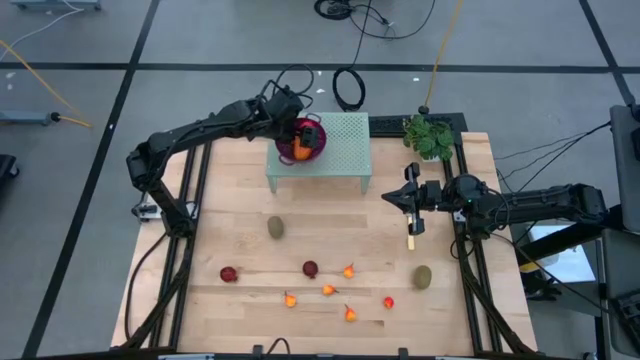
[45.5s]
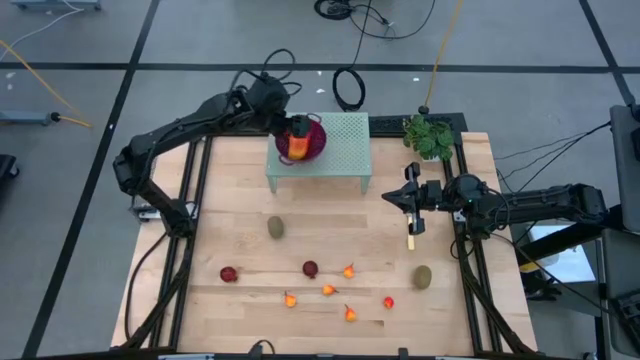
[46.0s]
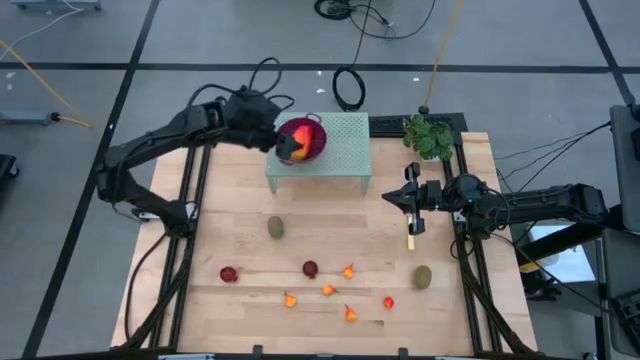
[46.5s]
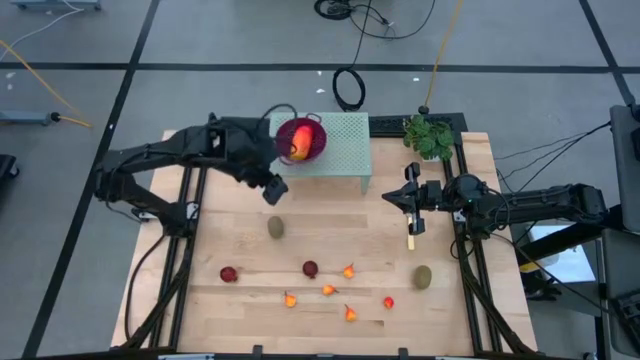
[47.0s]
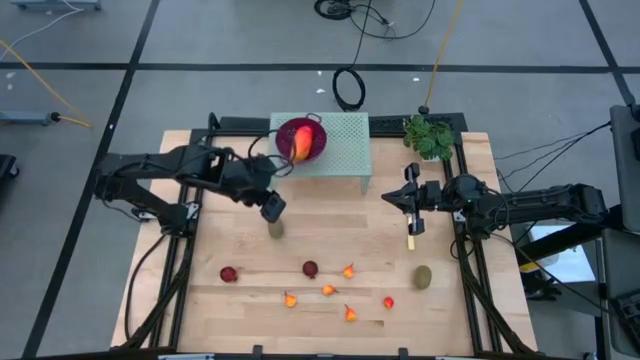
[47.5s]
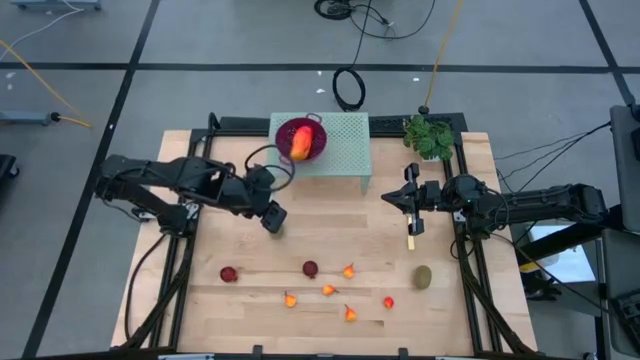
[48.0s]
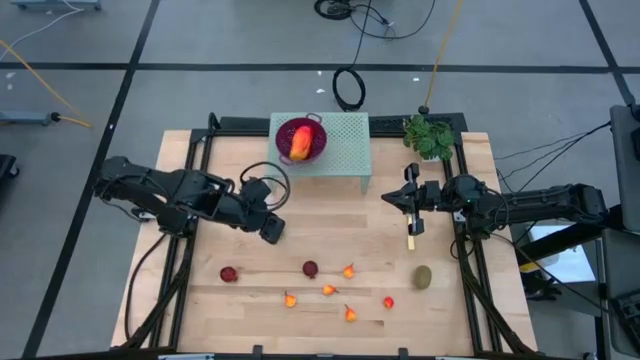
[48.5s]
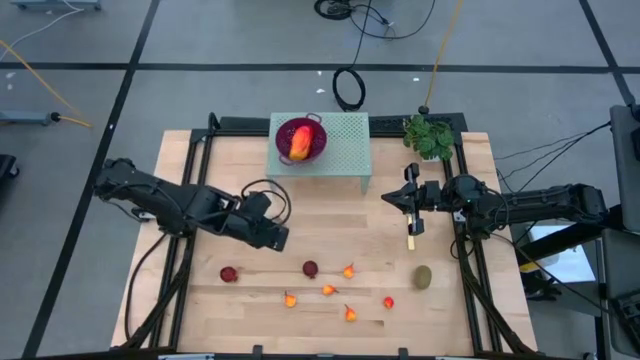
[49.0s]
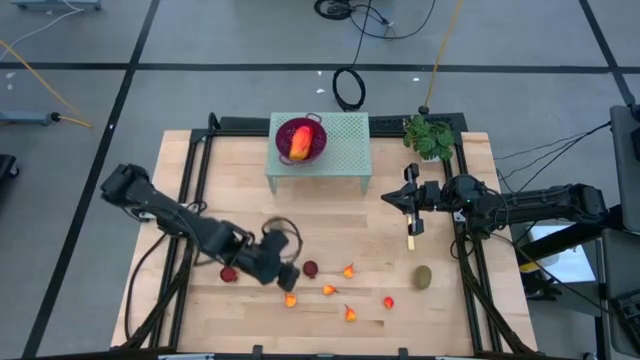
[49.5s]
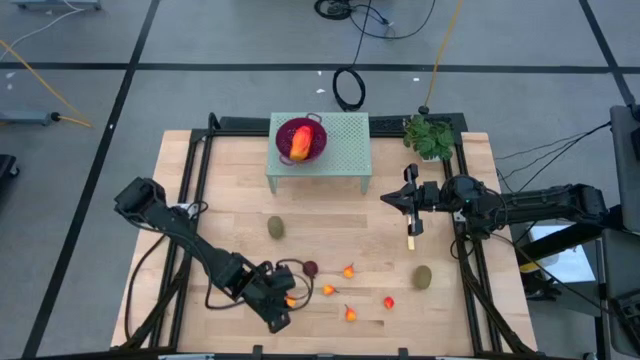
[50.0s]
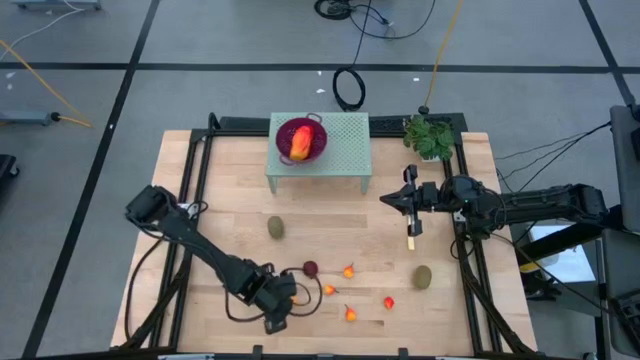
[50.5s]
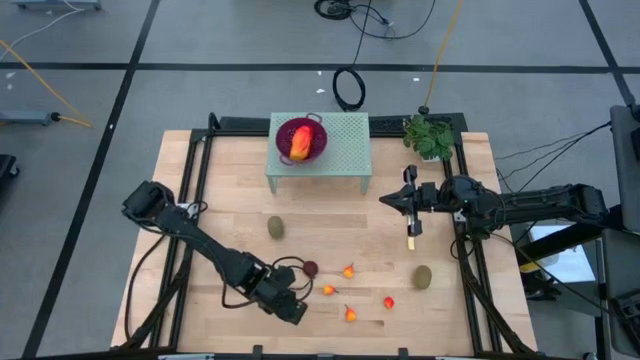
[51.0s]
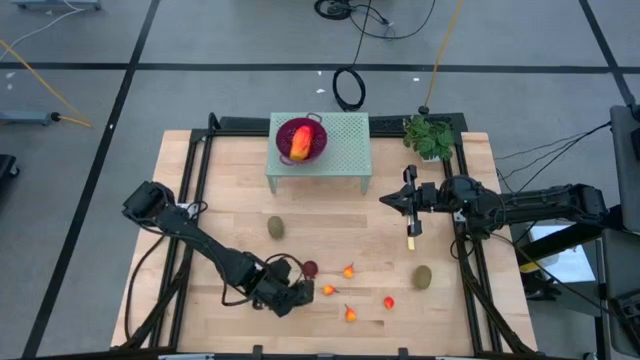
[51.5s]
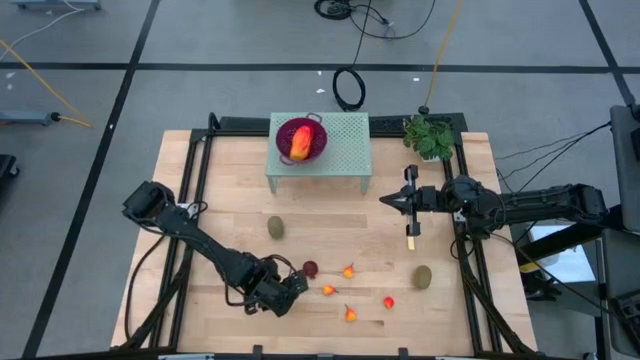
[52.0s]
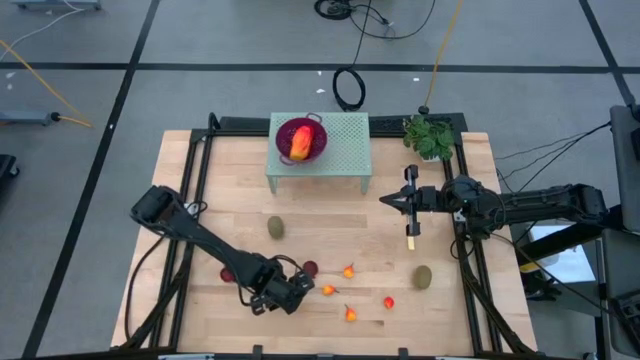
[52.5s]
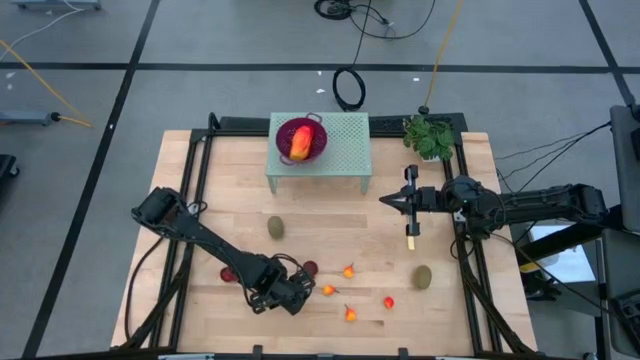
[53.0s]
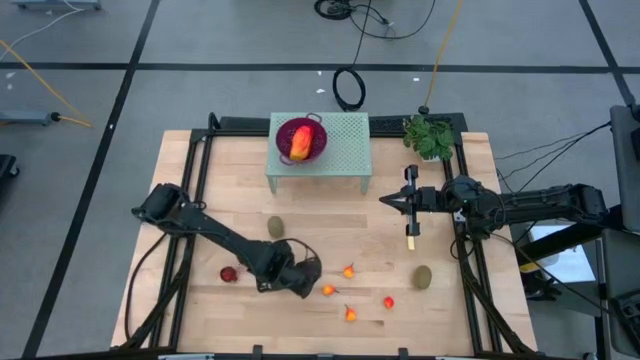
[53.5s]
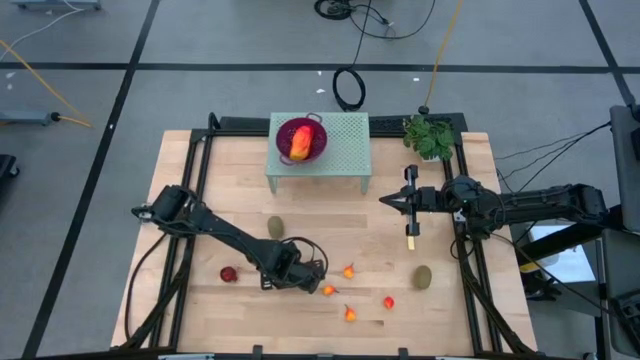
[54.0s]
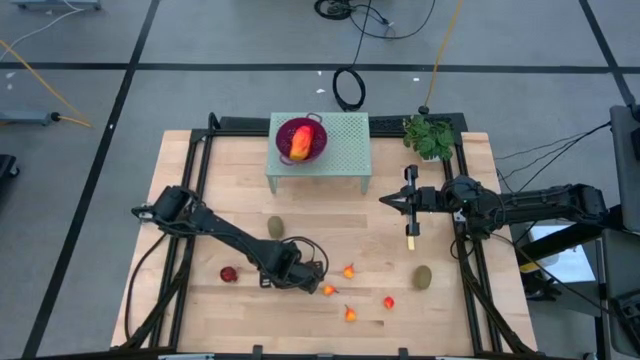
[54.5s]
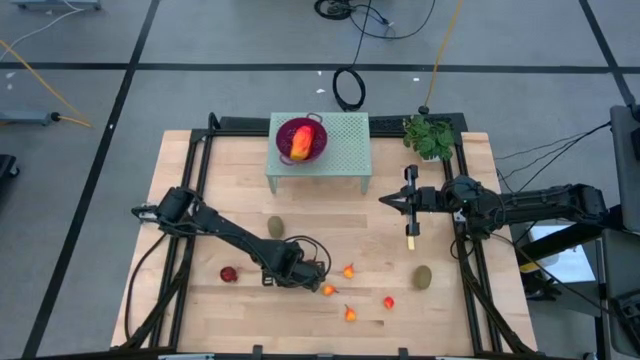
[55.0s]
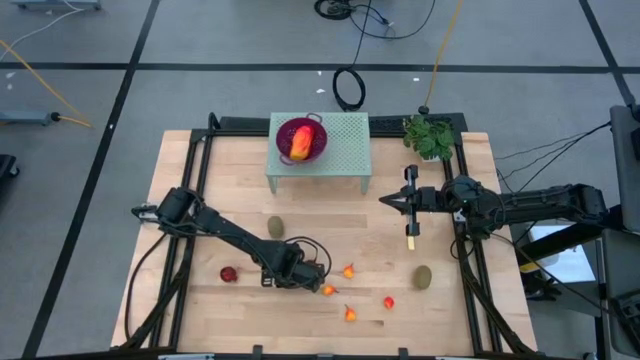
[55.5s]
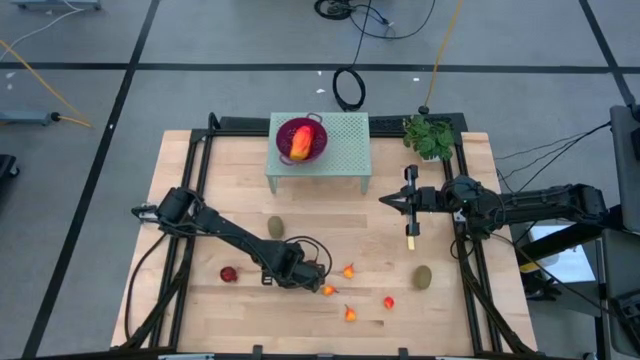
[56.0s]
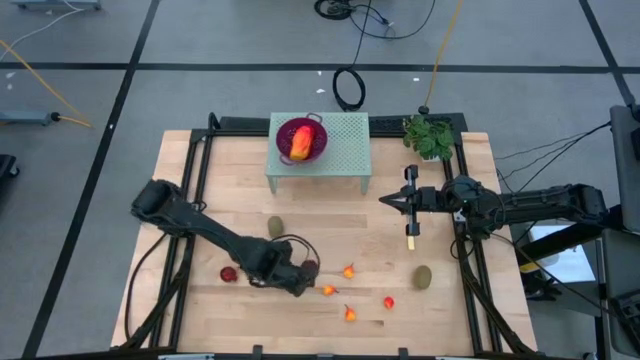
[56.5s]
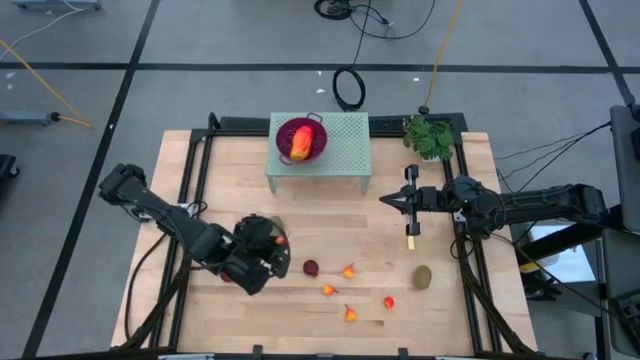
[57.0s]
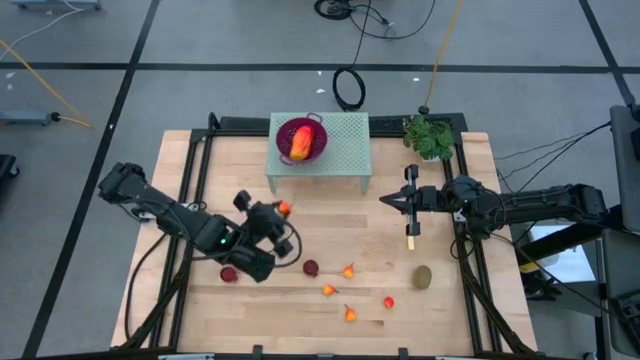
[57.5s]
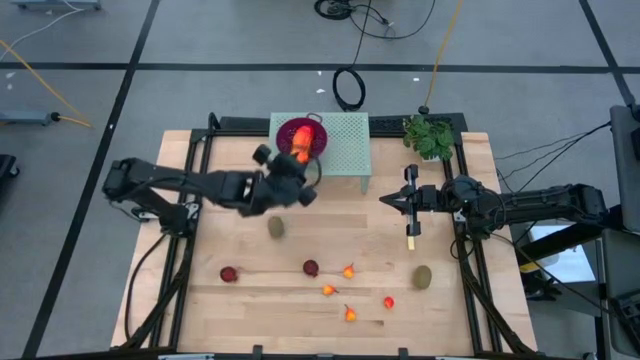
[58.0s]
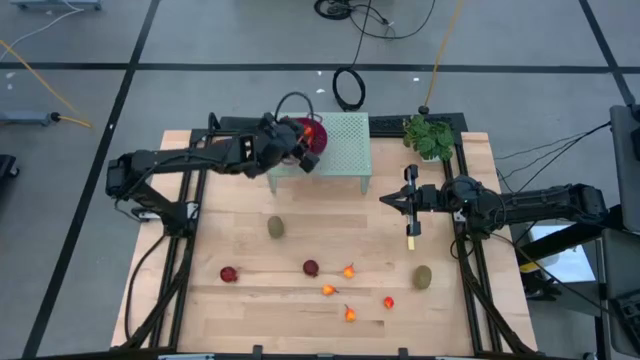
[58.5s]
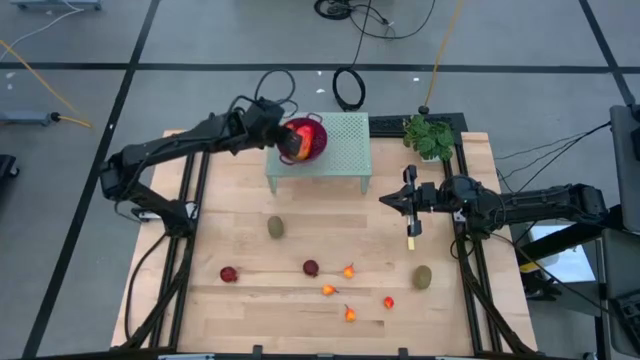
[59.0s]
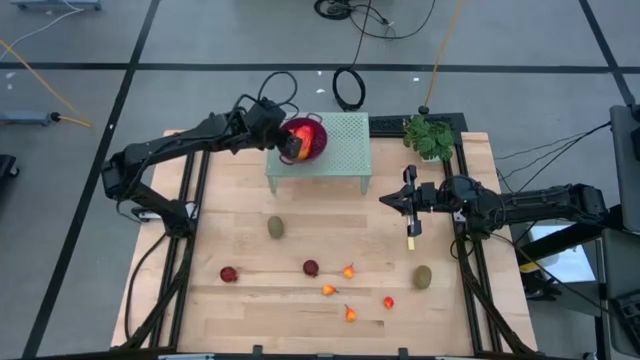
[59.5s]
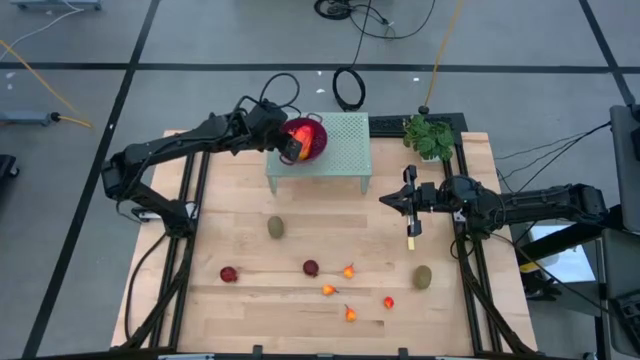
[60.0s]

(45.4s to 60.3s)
Task: Pick & Place Fruit
Put the pear into the violet strainer bowl on the shelf

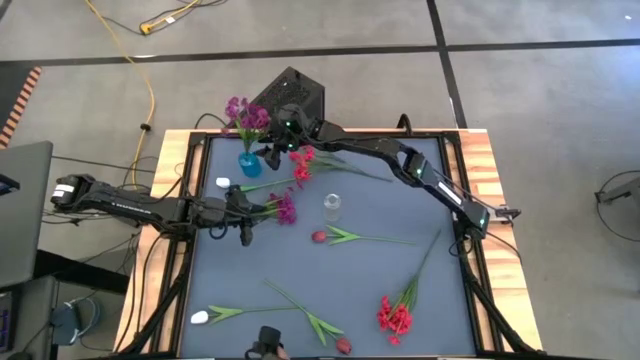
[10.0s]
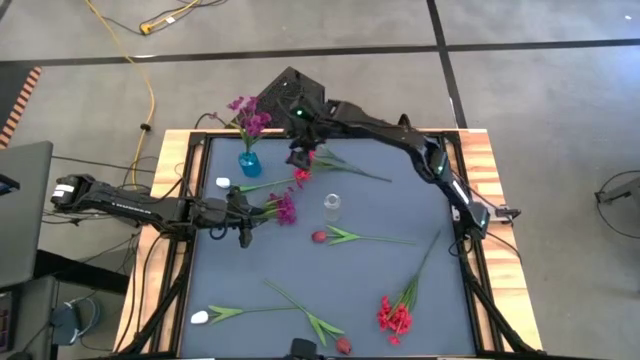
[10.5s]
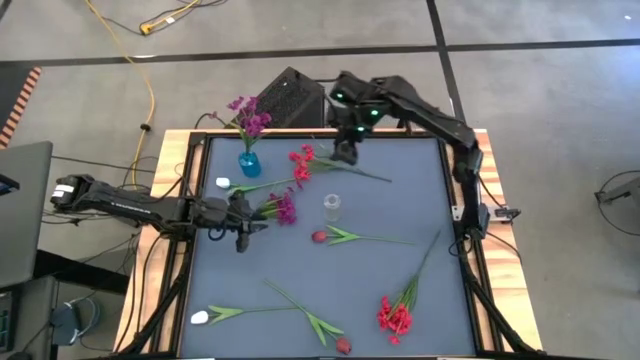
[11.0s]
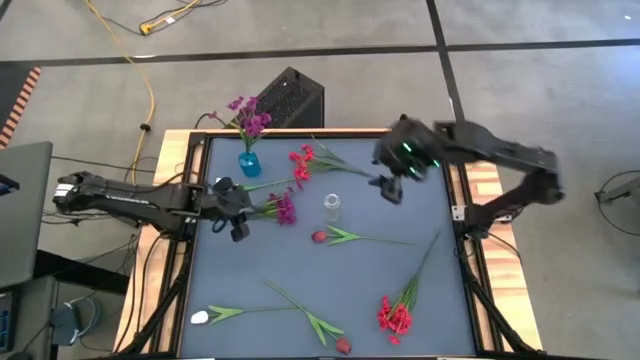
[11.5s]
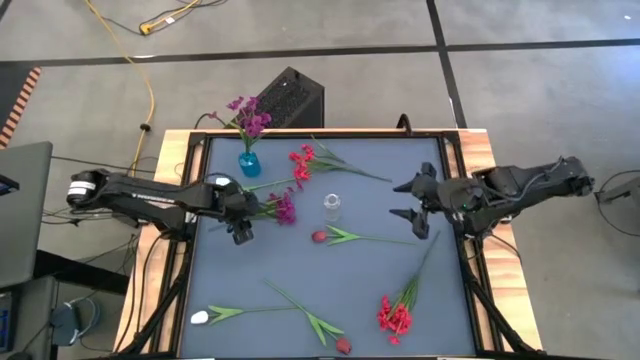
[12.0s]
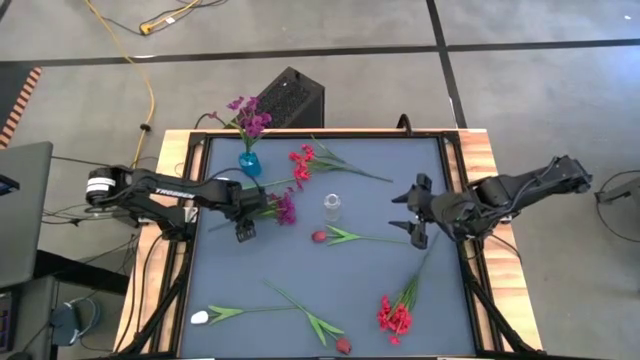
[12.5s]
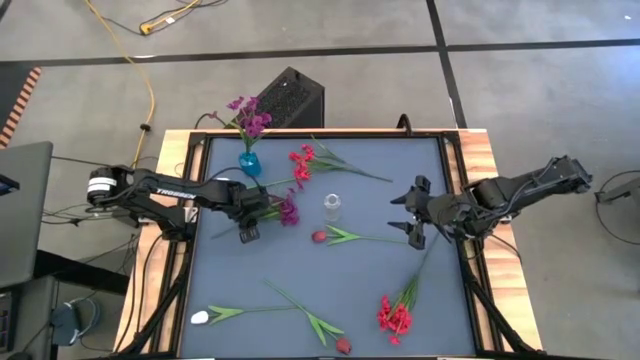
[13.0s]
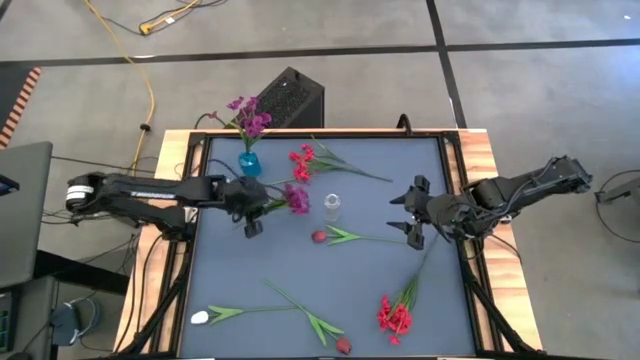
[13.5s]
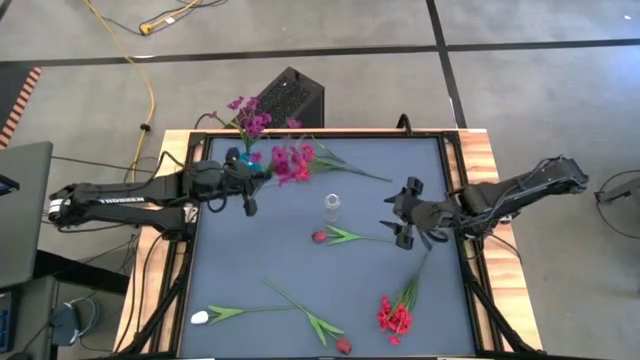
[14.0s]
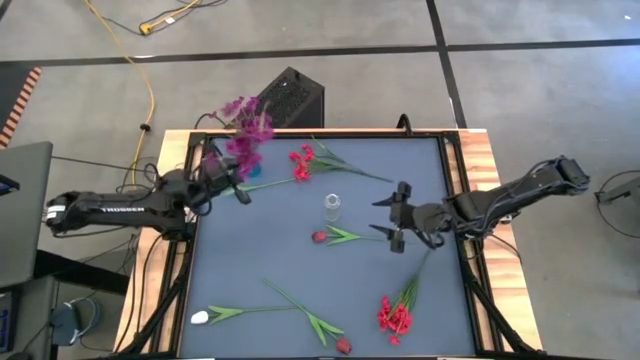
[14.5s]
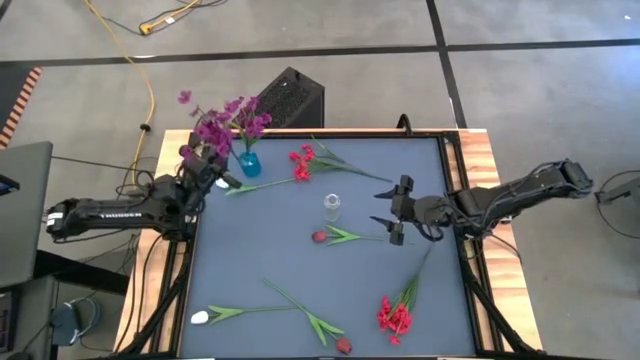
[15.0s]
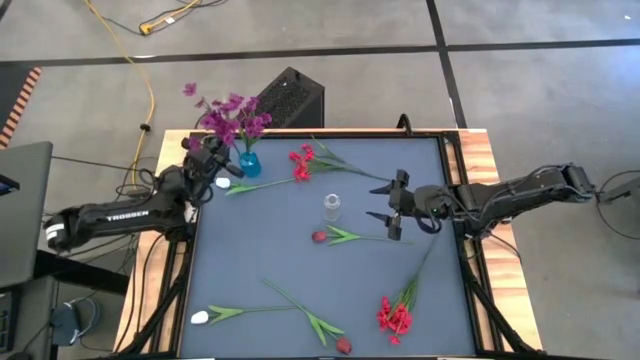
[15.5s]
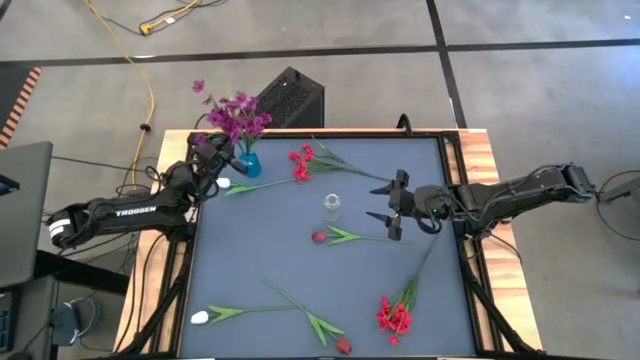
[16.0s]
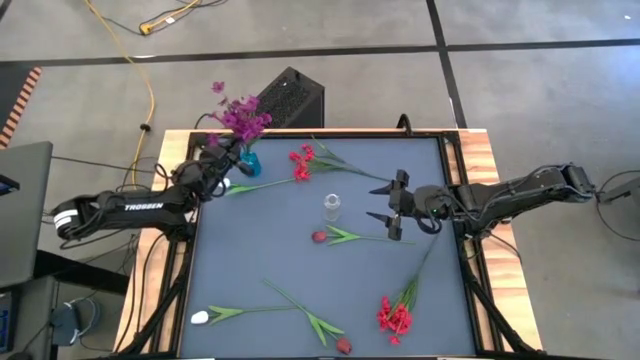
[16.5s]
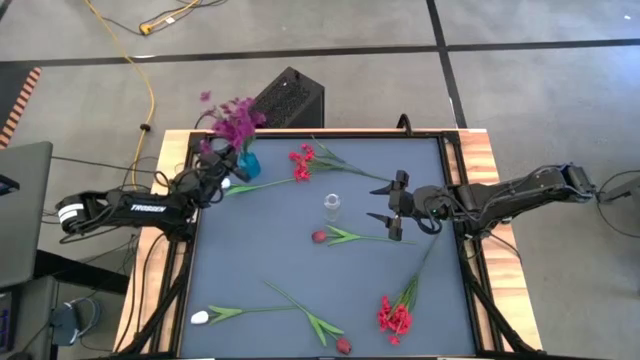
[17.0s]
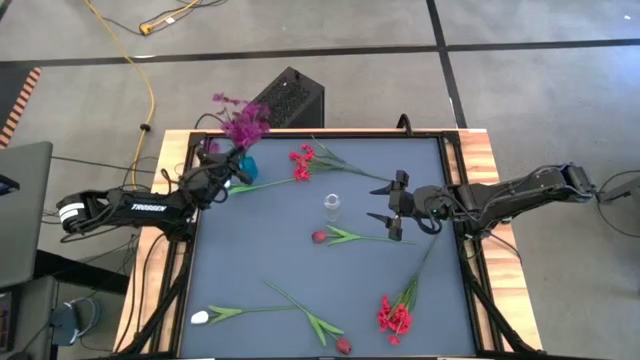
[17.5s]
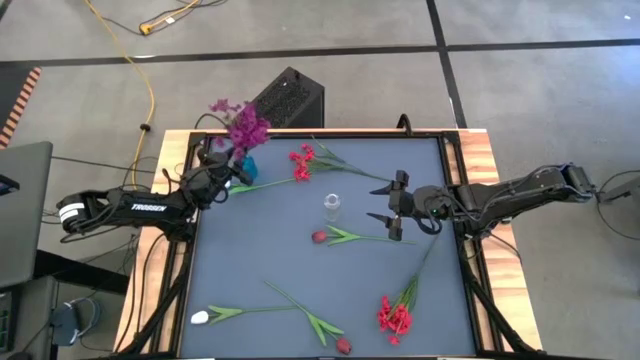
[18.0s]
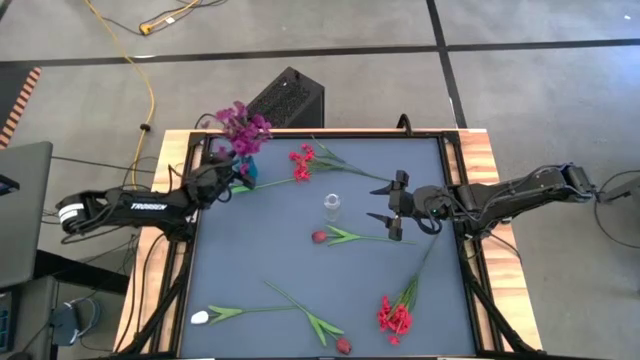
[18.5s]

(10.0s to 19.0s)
Task: Sort flowers into vase by color
Put the purple flowers into the blue vase
